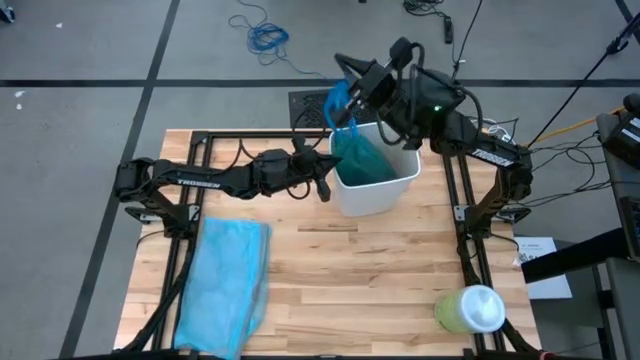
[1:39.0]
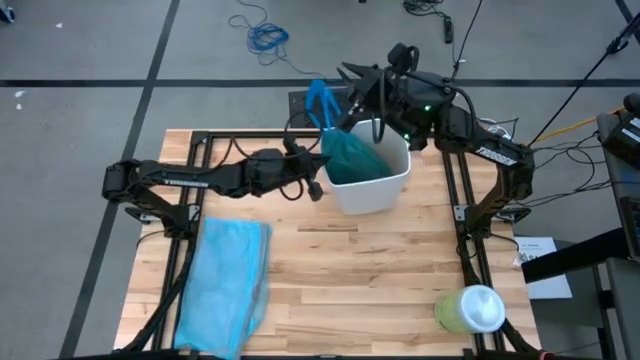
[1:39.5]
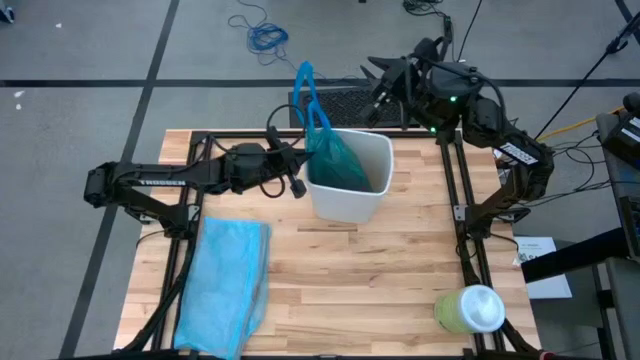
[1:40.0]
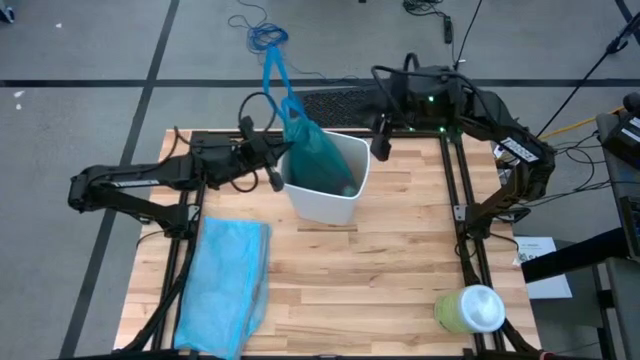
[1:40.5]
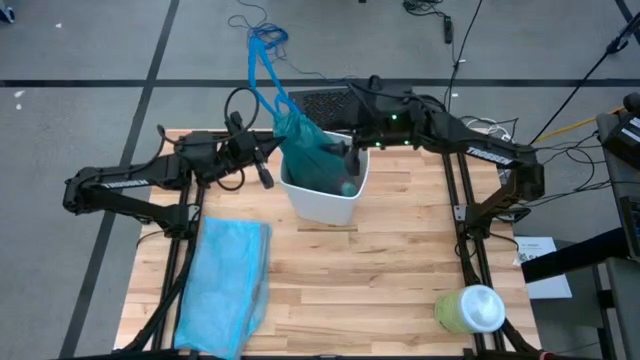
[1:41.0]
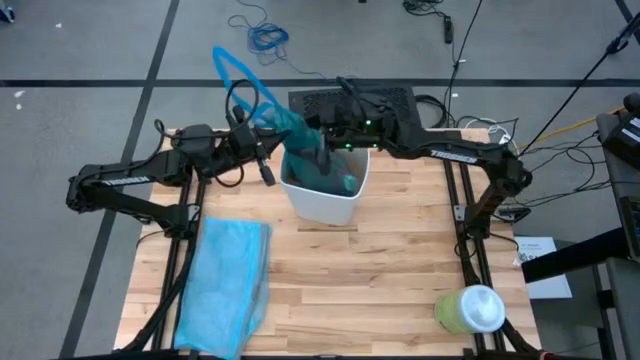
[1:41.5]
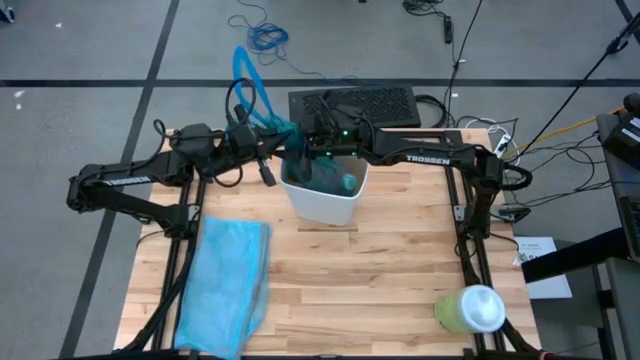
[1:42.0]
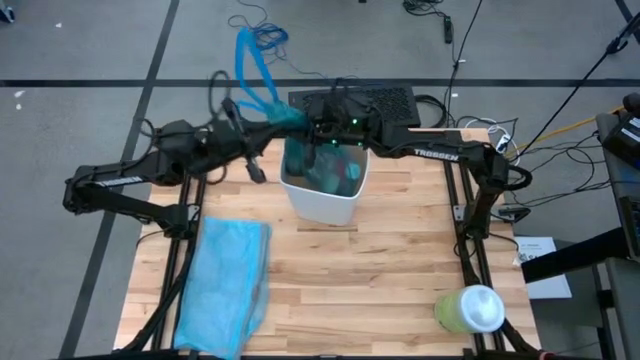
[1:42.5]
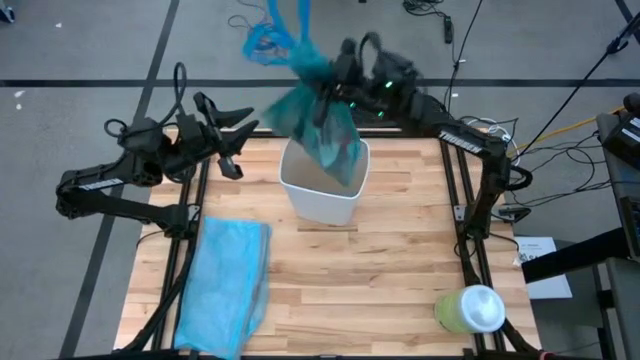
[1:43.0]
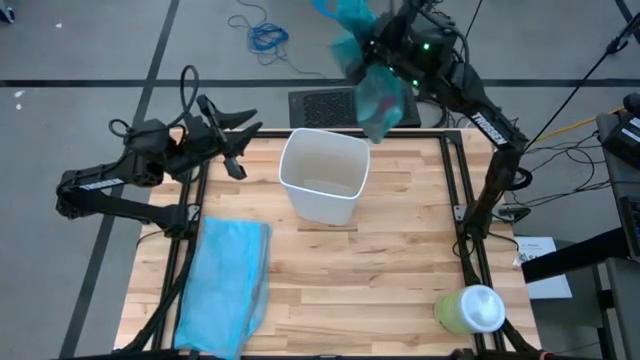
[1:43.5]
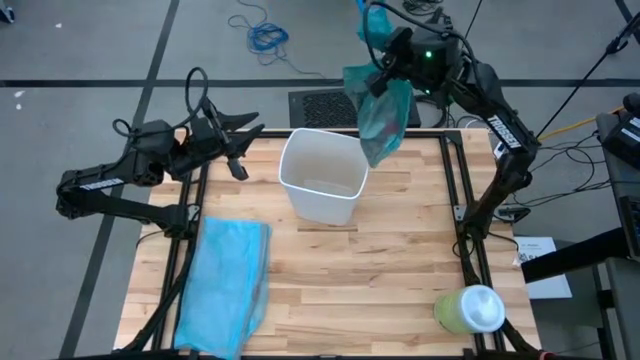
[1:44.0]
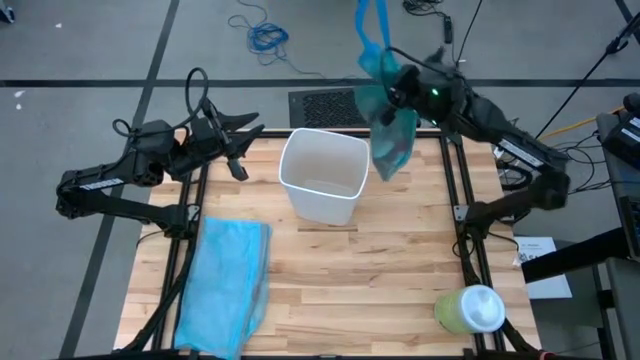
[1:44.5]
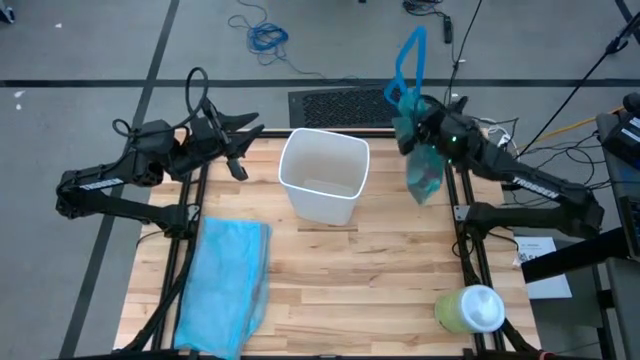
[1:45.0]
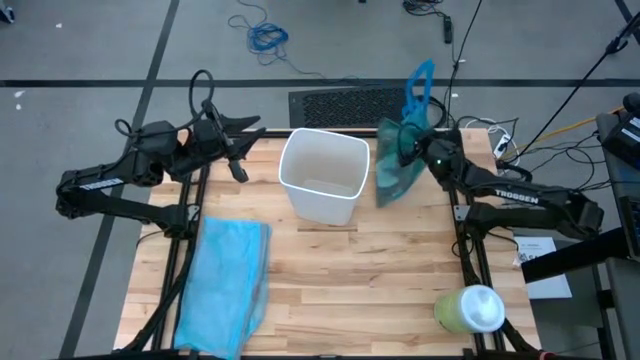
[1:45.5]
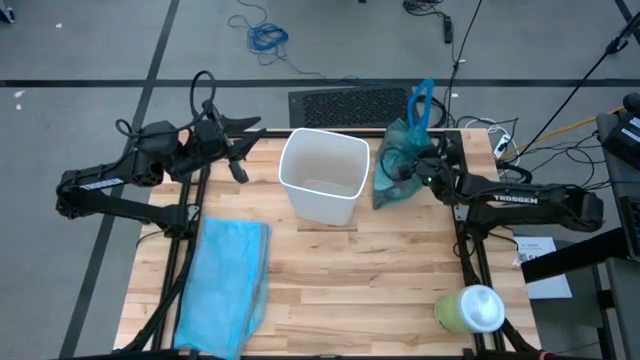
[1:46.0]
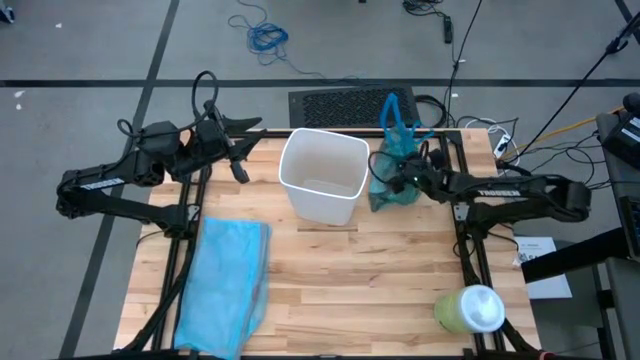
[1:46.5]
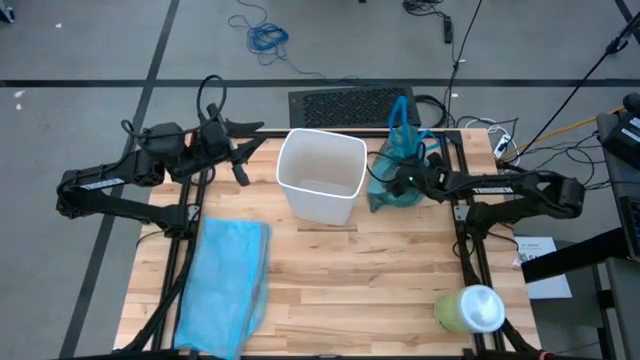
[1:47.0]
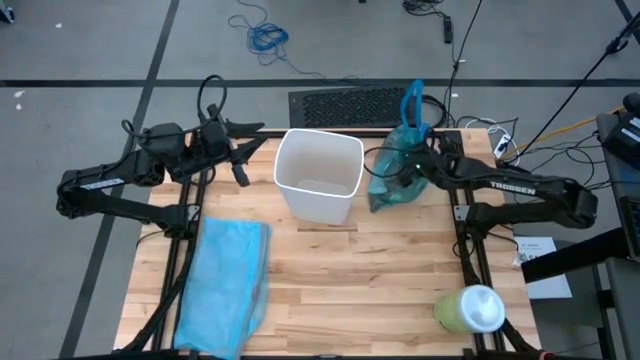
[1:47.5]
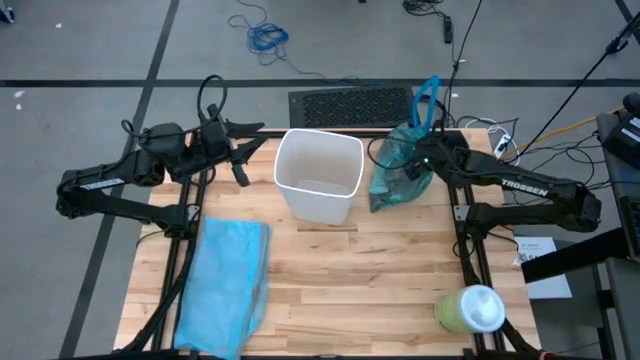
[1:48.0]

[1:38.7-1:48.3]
Task: place trash/remove bag and relplace
Remove the trash bag from the trash bin

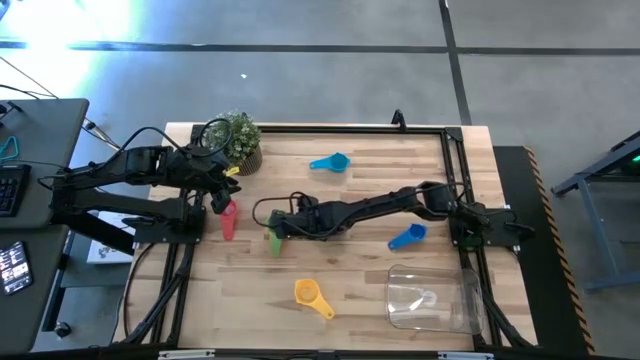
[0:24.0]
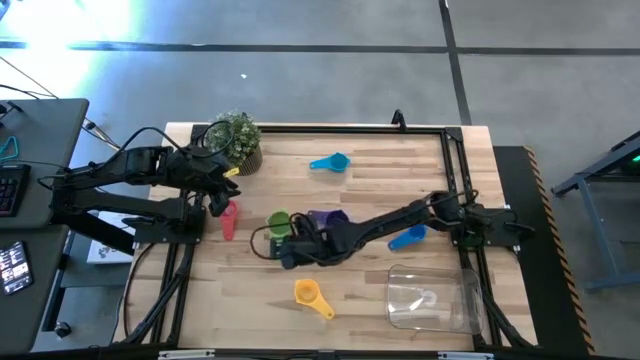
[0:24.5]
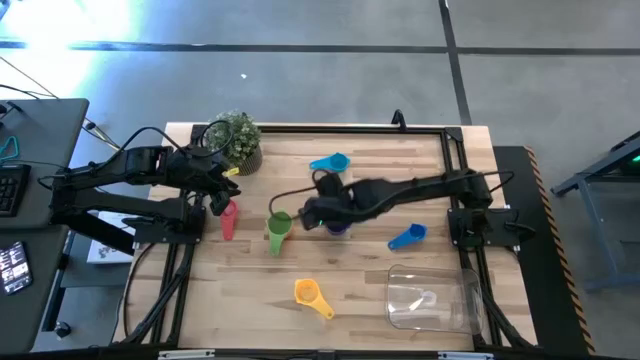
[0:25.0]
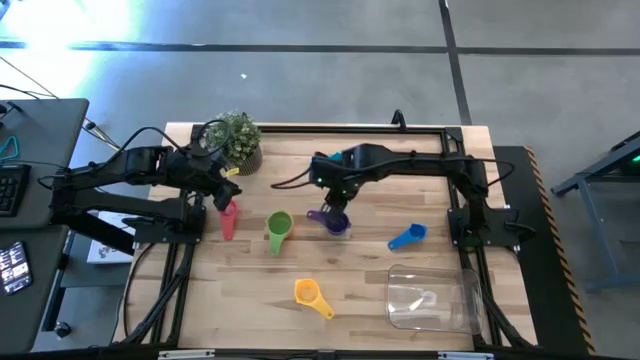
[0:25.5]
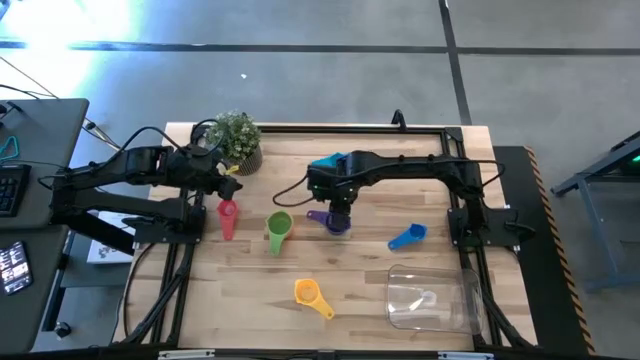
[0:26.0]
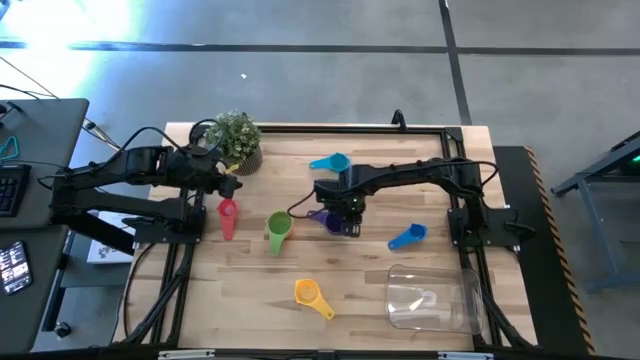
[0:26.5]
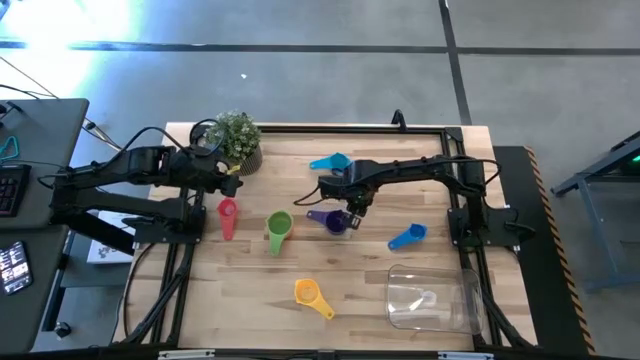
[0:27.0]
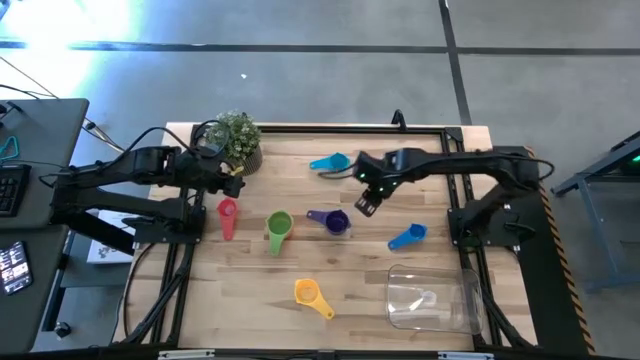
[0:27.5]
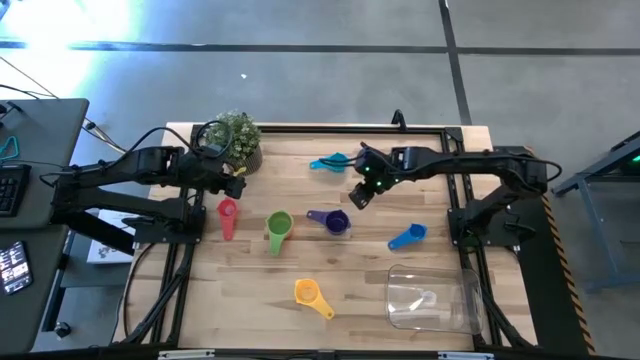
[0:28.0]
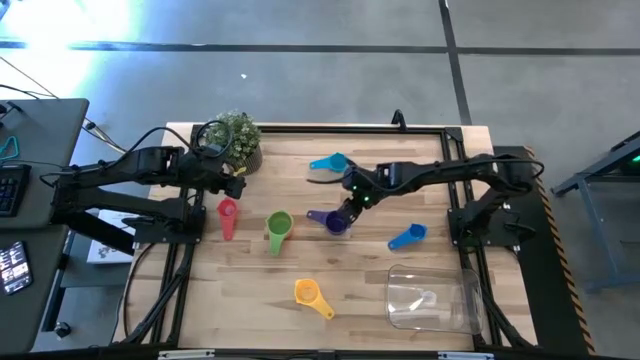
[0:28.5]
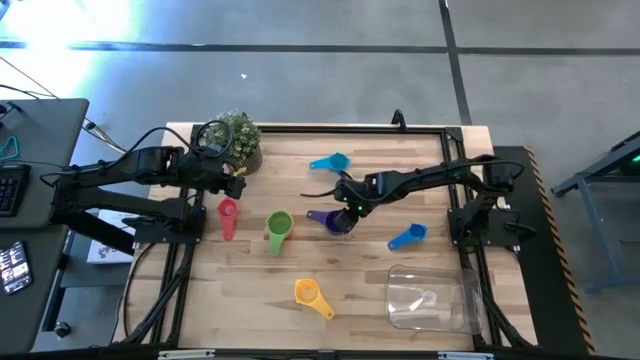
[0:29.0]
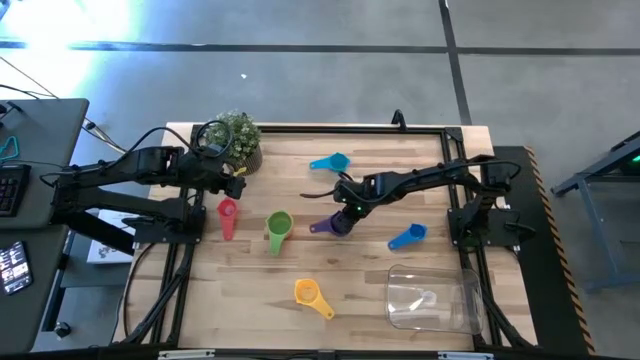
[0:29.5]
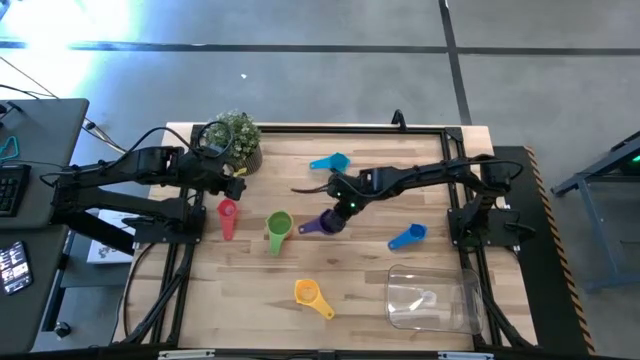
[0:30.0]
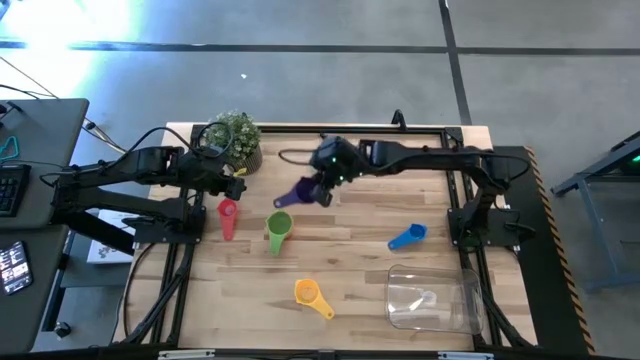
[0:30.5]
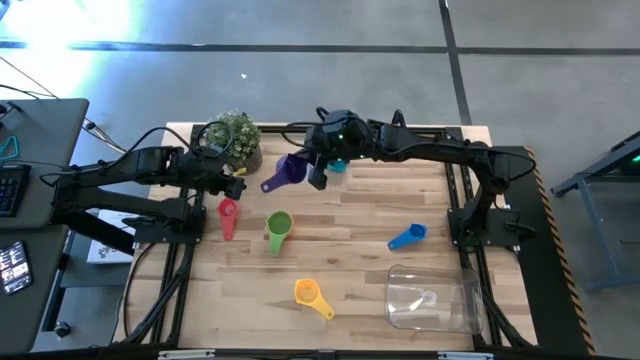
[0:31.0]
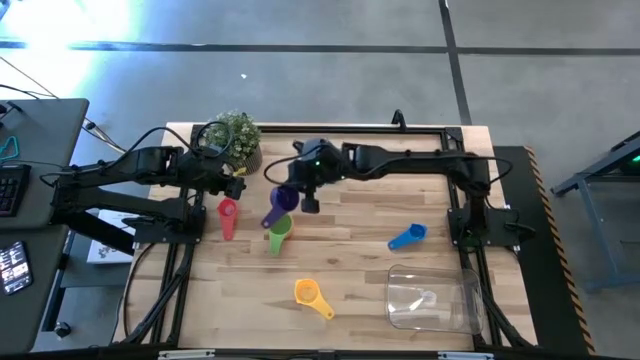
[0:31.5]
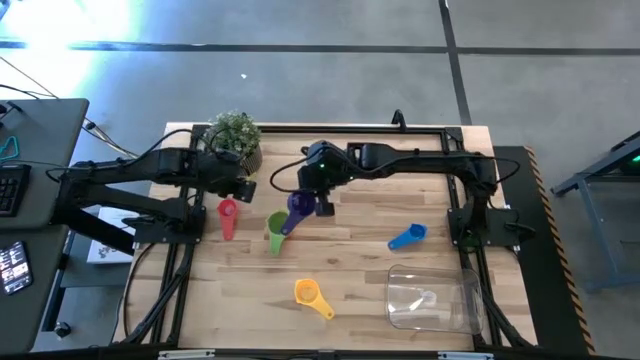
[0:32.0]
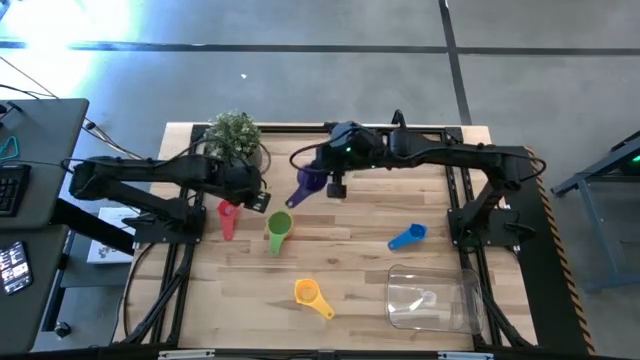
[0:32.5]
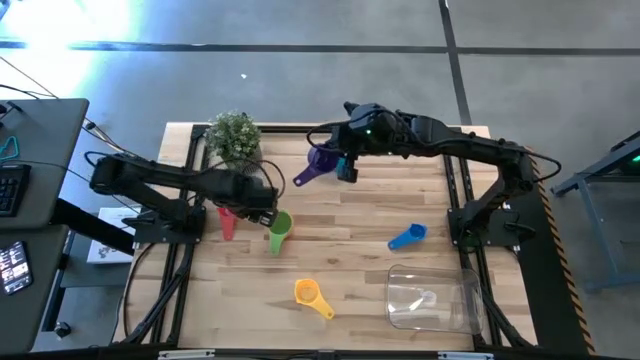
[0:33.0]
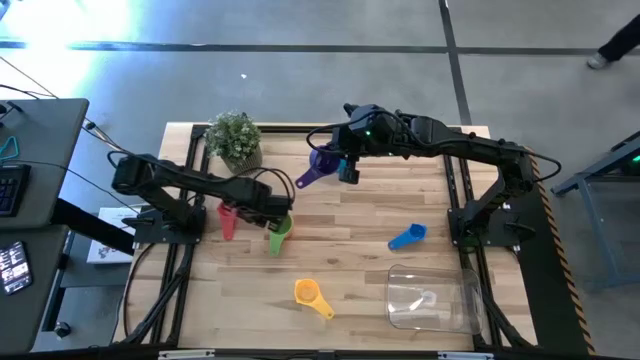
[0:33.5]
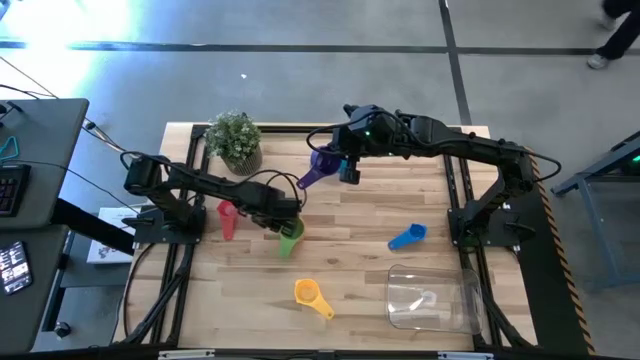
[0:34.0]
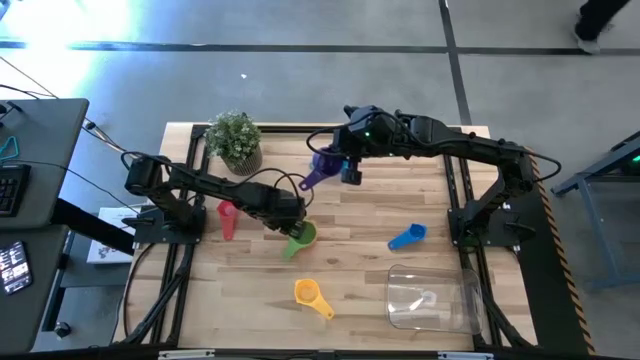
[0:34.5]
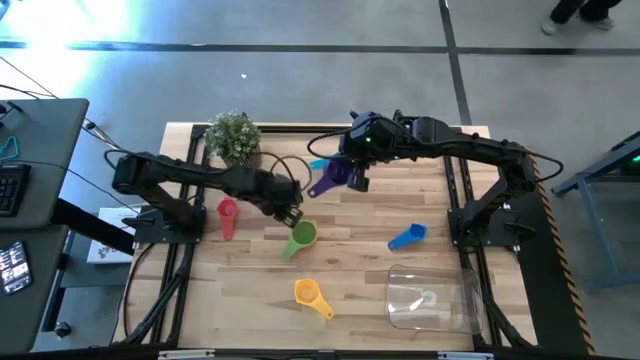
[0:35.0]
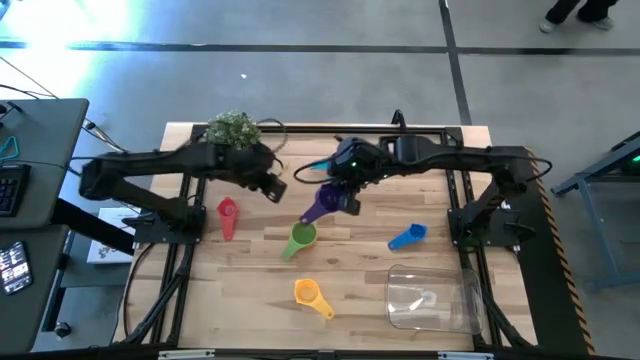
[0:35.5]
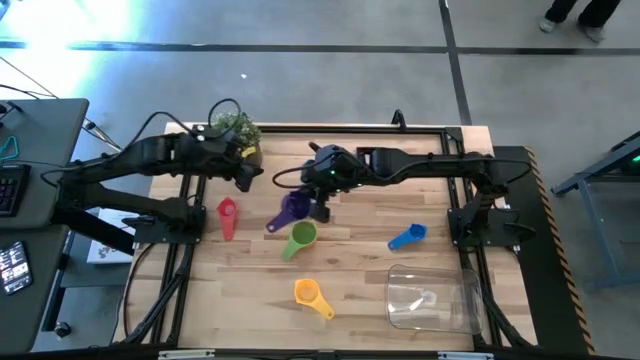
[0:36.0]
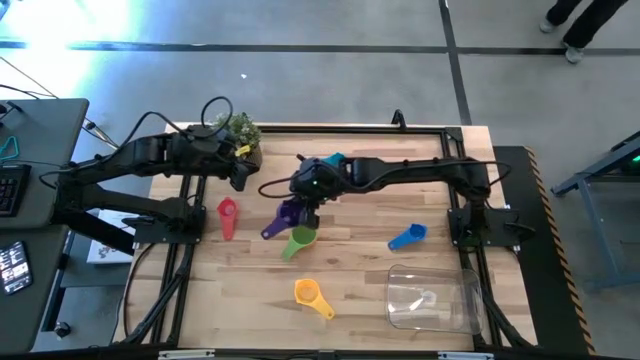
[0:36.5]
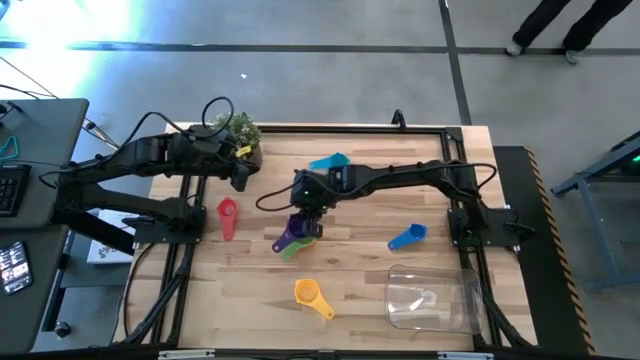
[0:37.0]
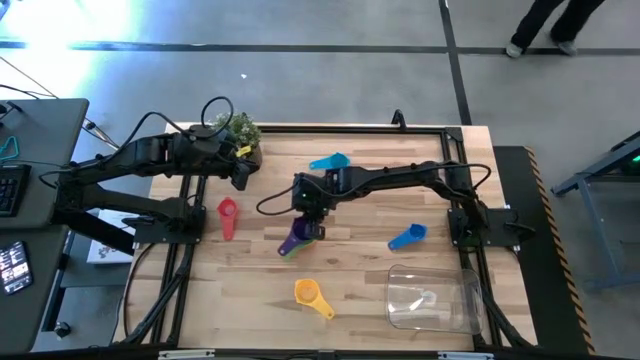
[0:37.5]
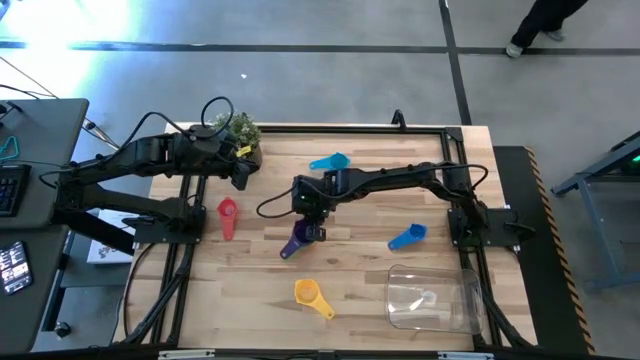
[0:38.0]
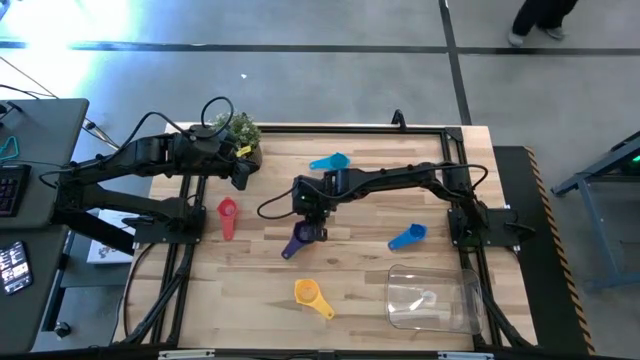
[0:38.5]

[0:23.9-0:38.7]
Task: Nest measuring cups in basket
Stack the violet measuring cup on top of the green measuring cup
